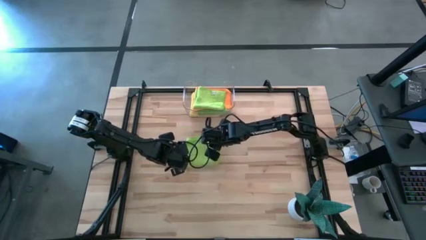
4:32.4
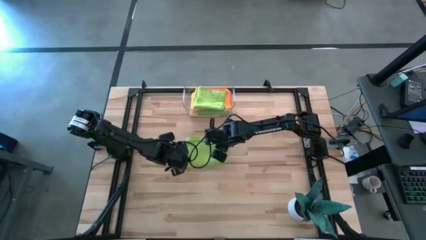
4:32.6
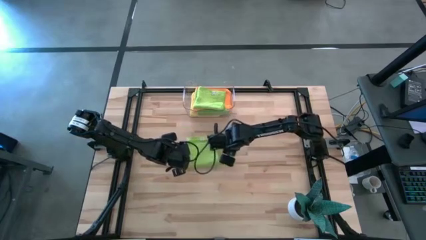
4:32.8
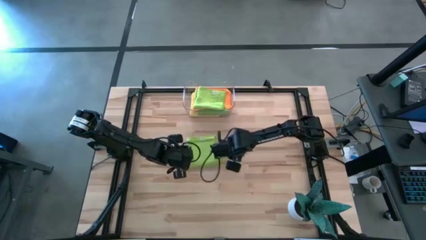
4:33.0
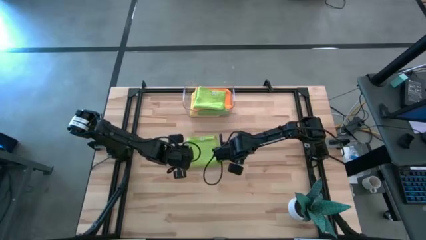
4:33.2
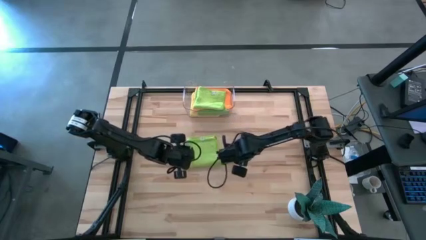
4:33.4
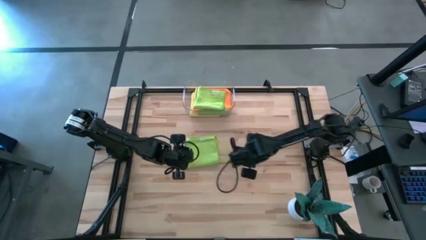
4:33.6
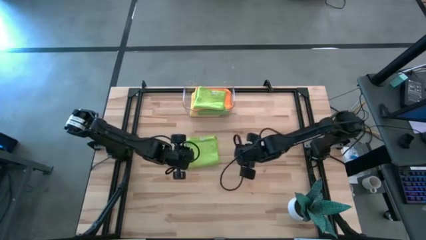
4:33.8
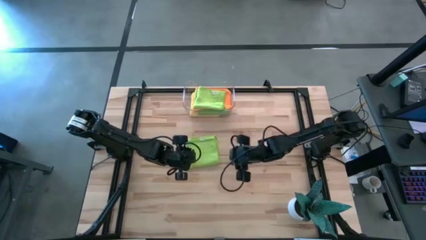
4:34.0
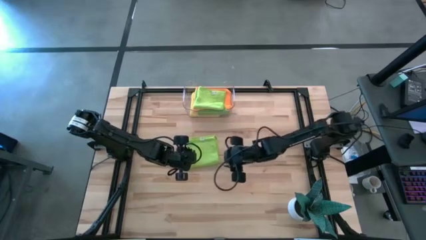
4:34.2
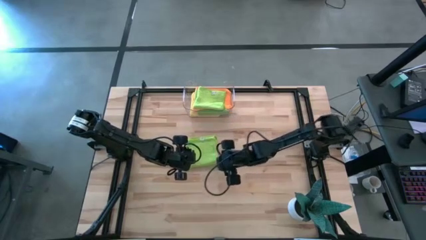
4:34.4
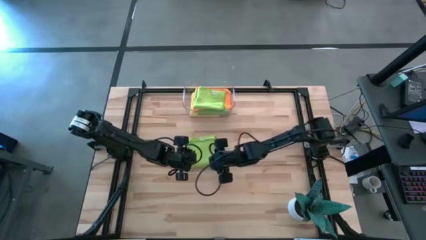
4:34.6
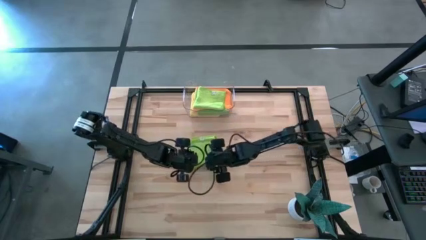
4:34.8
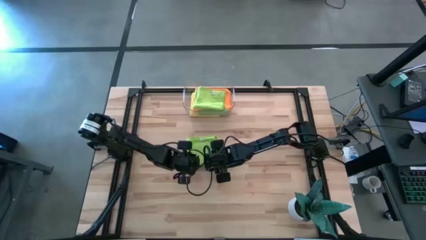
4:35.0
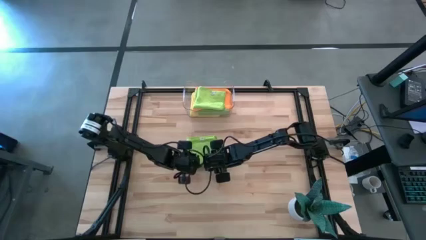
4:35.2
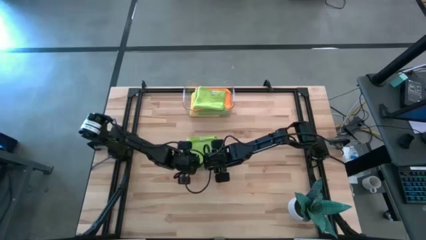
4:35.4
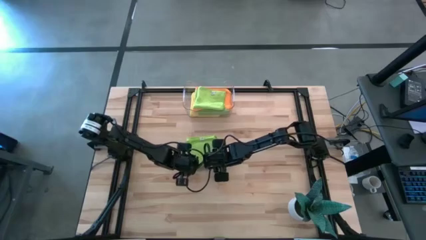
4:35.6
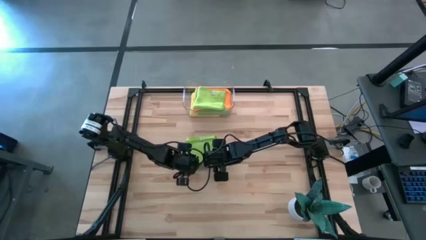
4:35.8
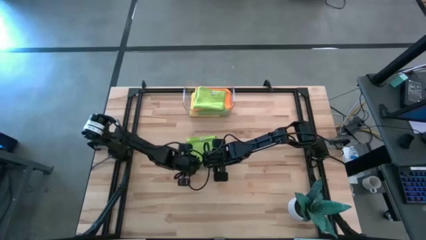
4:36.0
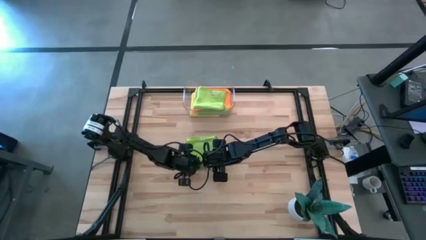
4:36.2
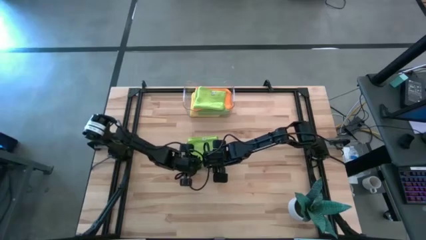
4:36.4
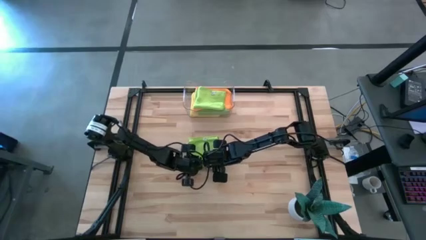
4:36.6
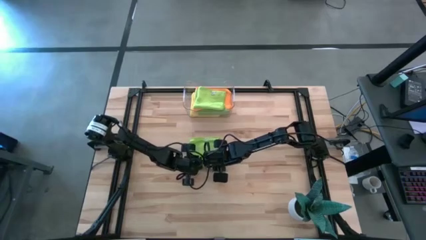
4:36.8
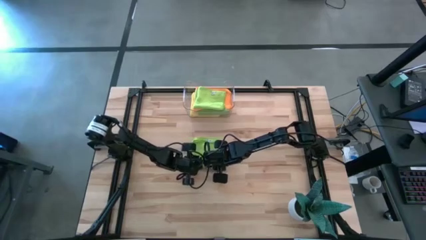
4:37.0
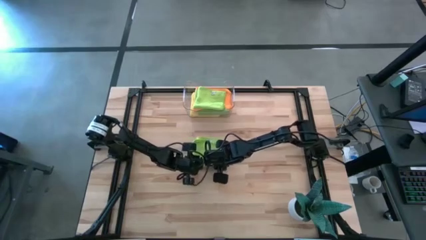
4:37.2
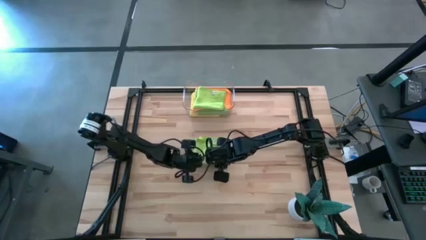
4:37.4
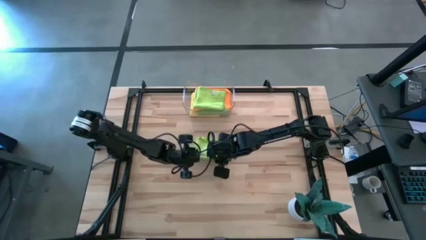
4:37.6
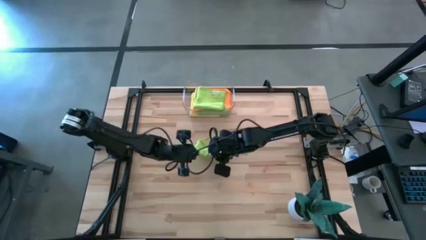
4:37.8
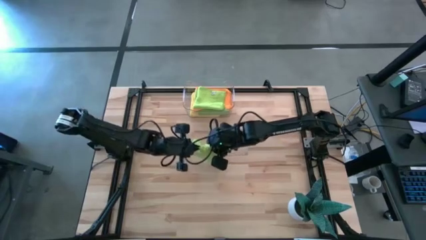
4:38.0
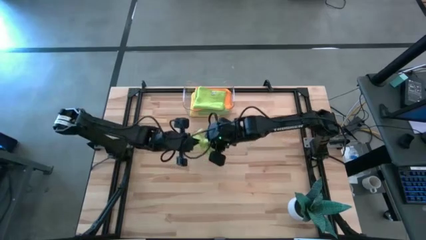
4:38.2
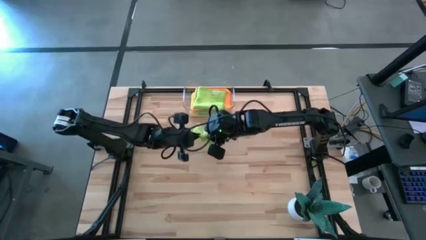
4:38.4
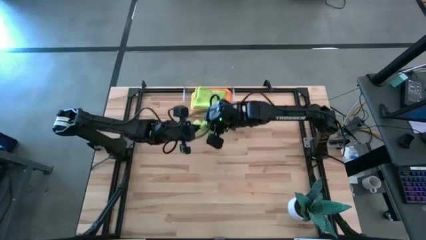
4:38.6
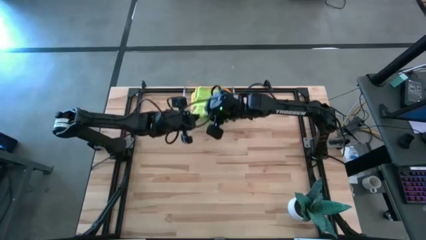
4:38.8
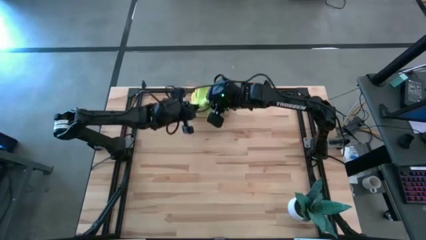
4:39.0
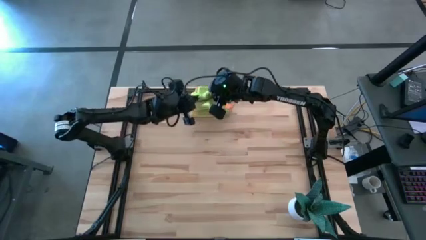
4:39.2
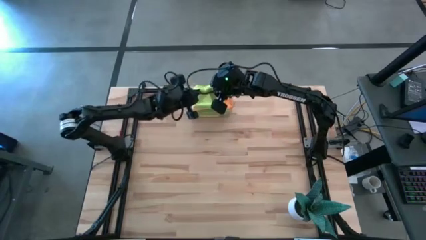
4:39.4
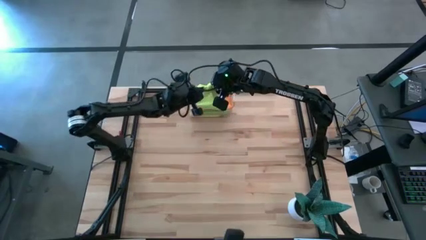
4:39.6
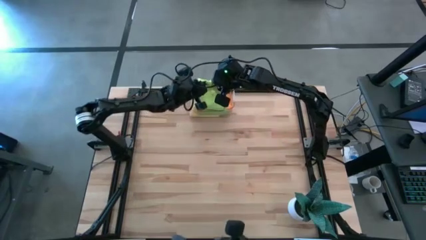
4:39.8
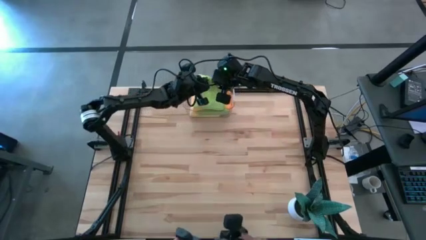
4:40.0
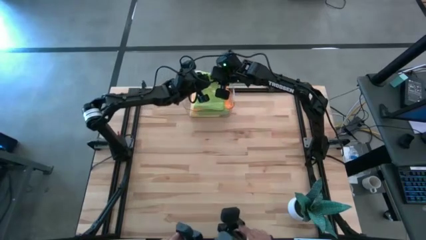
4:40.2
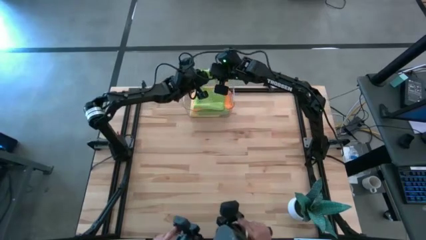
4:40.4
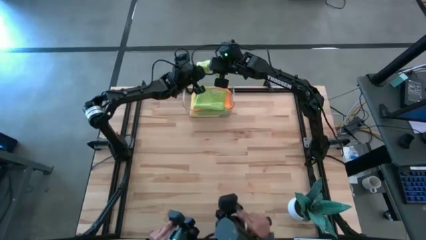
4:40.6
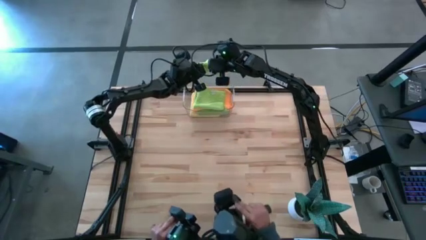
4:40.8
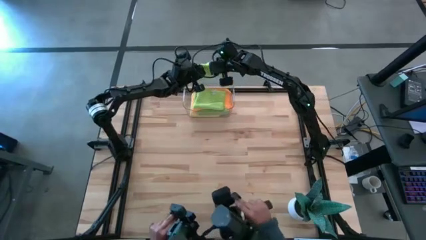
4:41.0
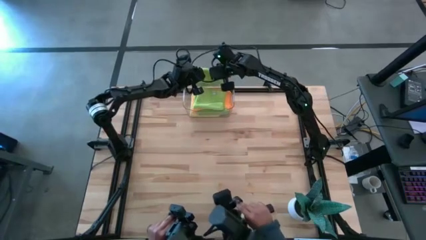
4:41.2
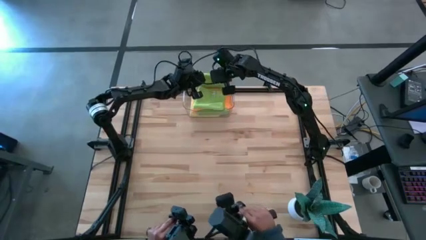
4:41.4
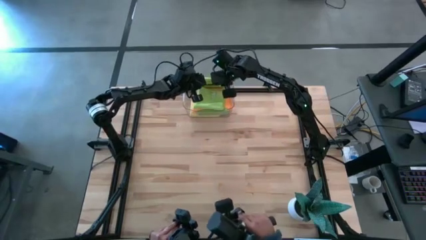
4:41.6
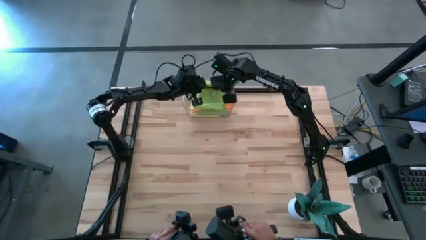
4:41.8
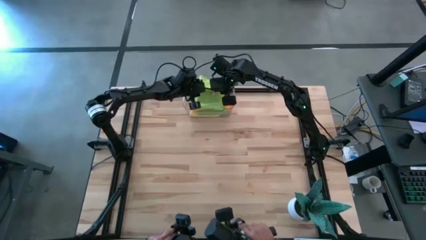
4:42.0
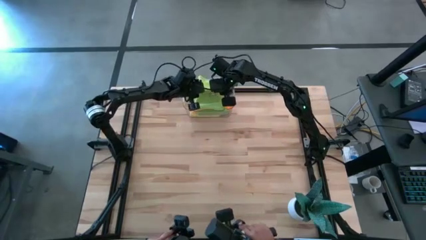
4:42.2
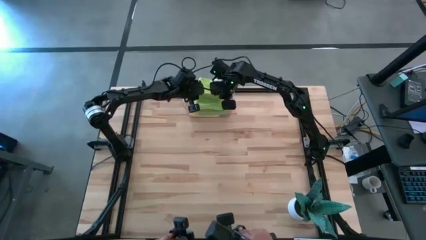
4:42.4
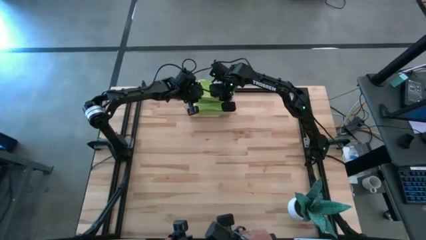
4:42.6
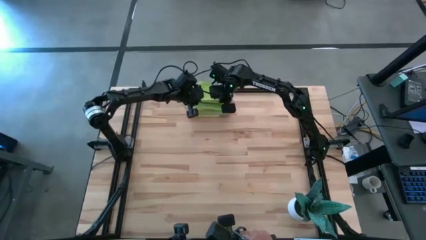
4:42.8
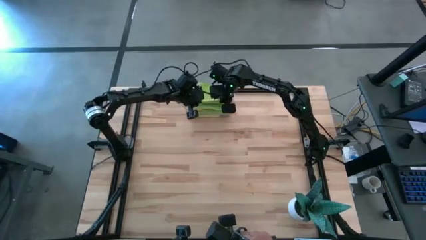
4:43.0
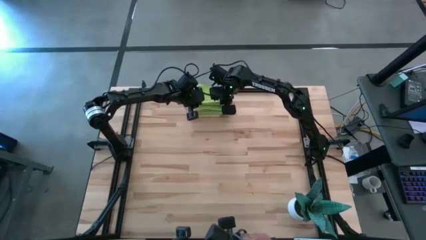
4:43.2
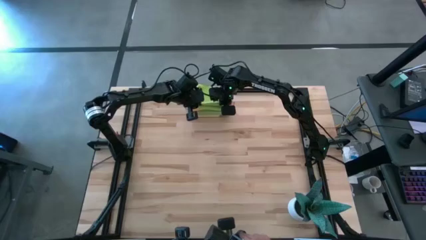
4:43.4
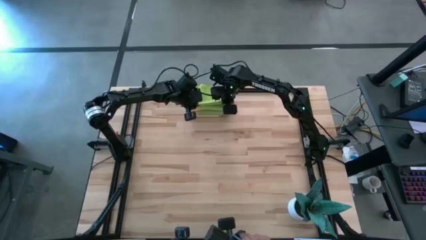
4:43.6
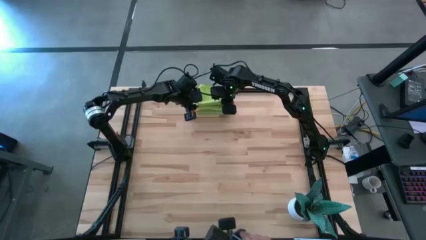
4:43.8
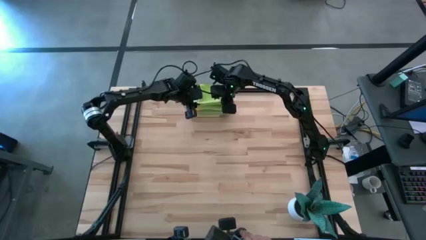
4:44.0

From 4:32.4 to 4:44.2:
Task: Fold microfiber towels
Put the light green microfiber cloth into the transparent bin
